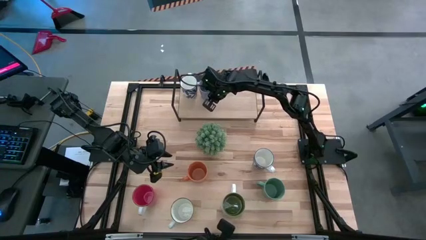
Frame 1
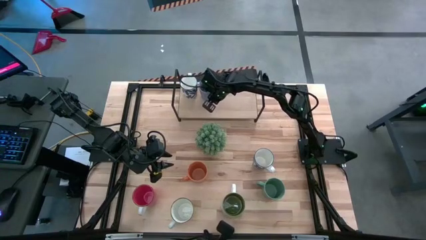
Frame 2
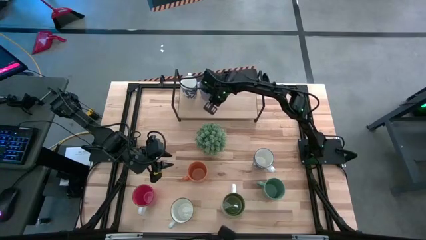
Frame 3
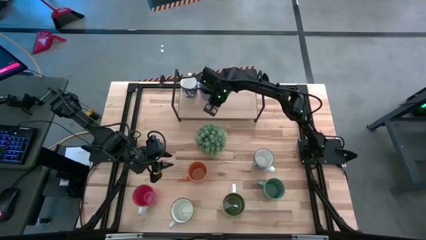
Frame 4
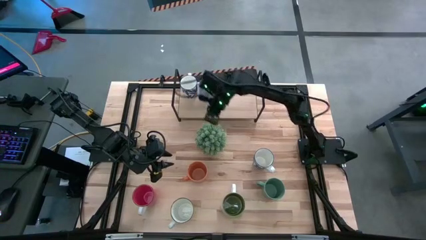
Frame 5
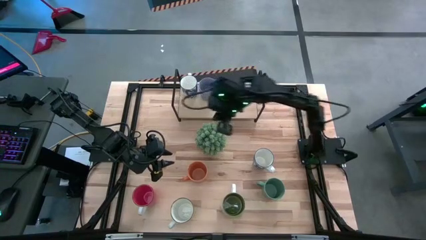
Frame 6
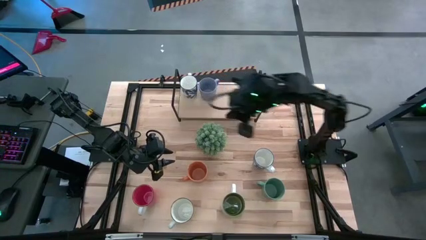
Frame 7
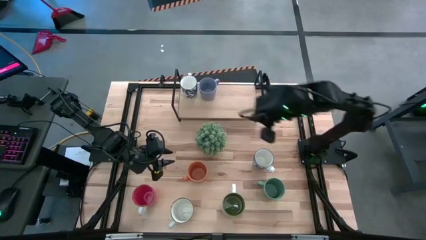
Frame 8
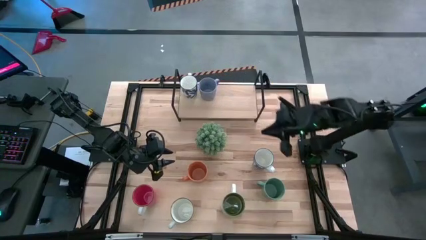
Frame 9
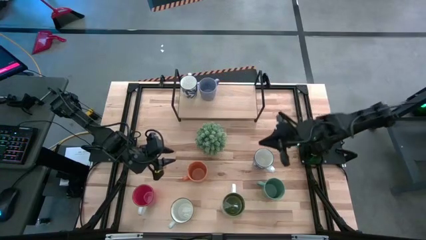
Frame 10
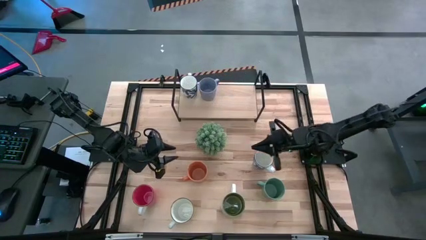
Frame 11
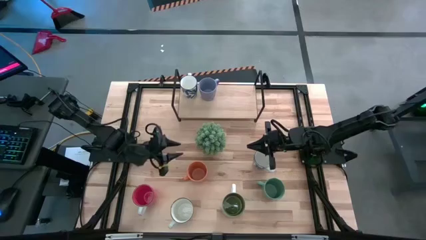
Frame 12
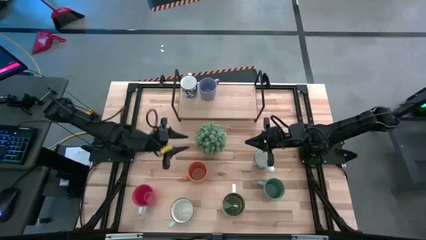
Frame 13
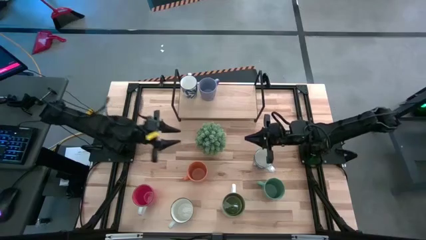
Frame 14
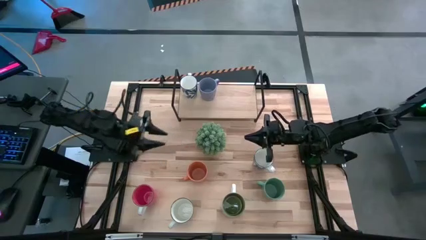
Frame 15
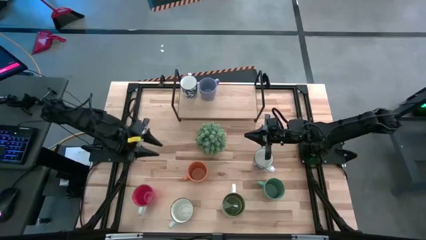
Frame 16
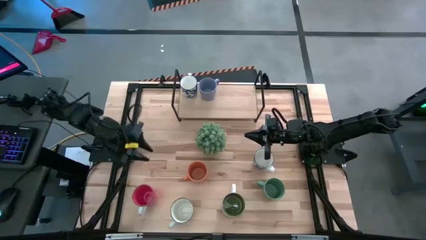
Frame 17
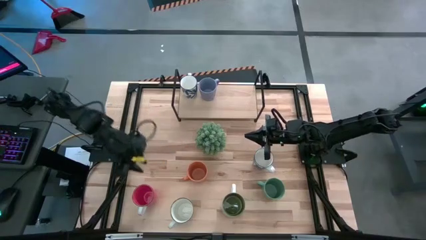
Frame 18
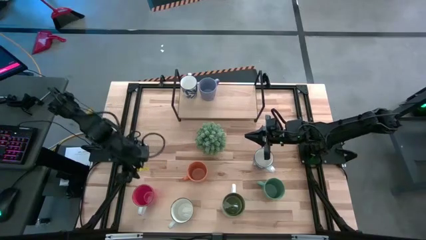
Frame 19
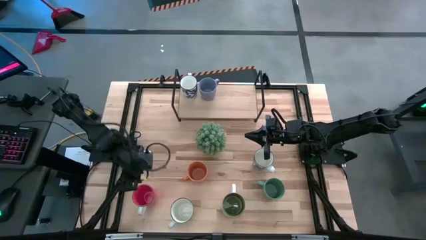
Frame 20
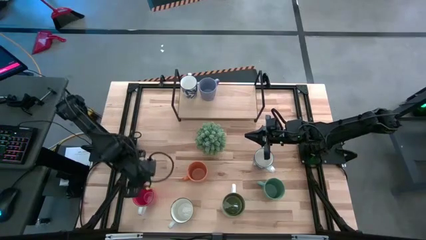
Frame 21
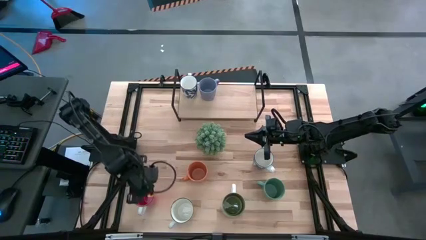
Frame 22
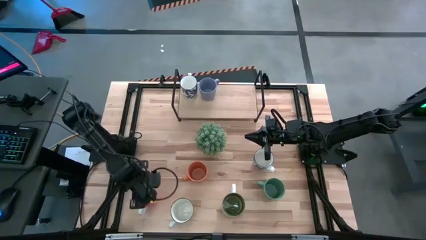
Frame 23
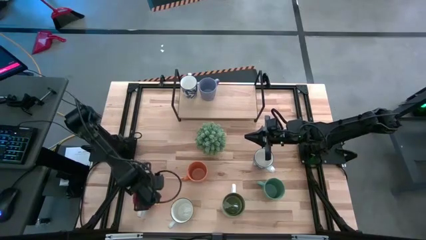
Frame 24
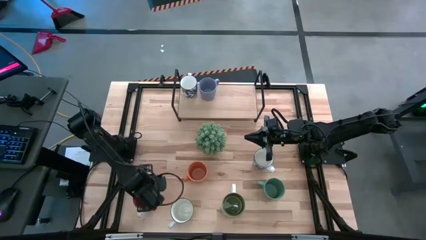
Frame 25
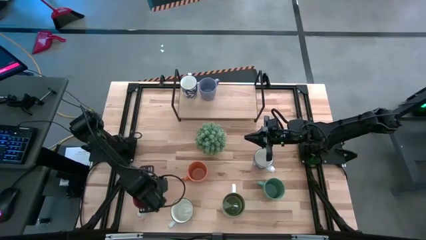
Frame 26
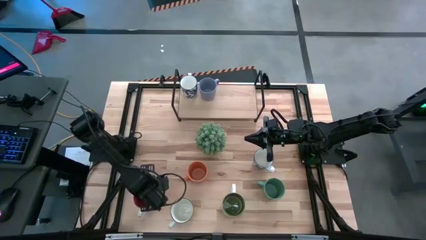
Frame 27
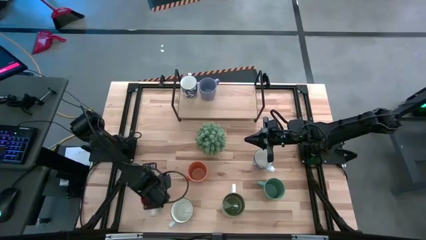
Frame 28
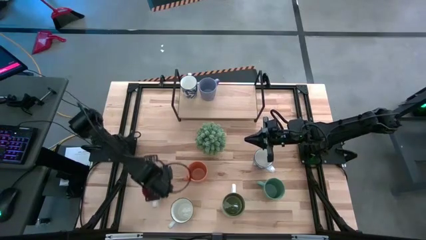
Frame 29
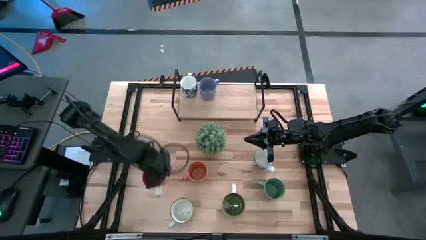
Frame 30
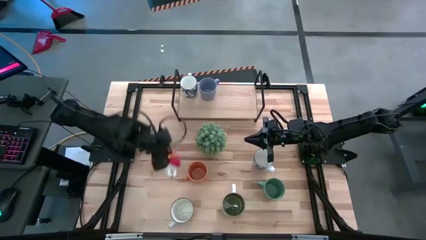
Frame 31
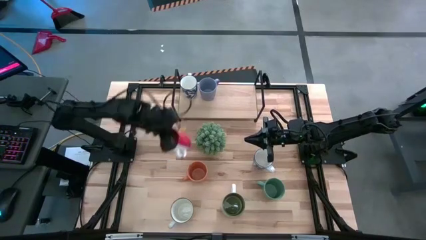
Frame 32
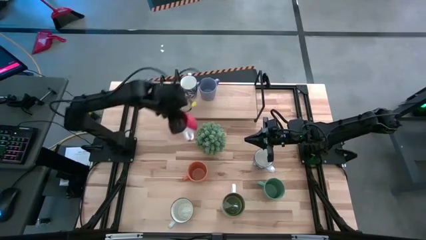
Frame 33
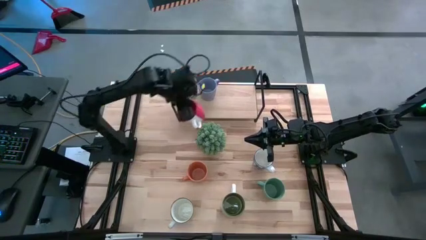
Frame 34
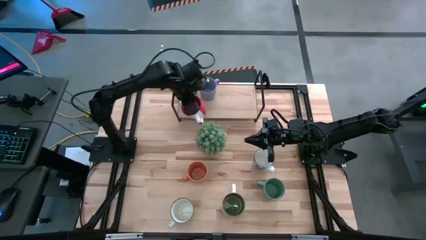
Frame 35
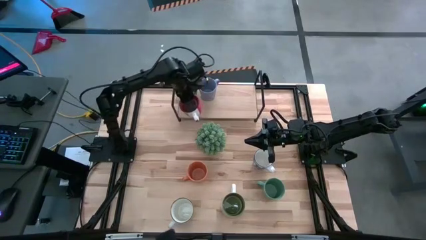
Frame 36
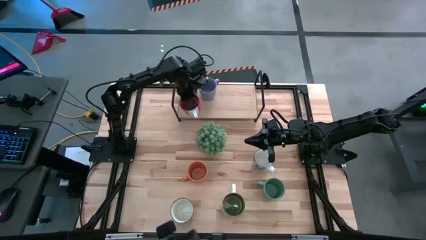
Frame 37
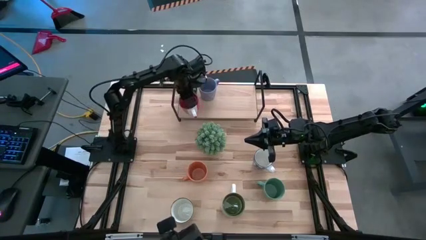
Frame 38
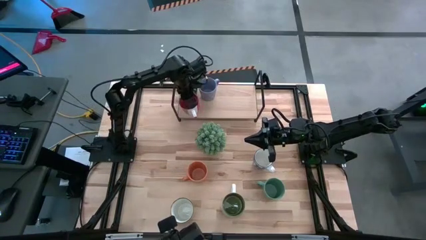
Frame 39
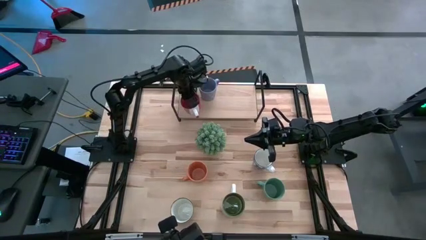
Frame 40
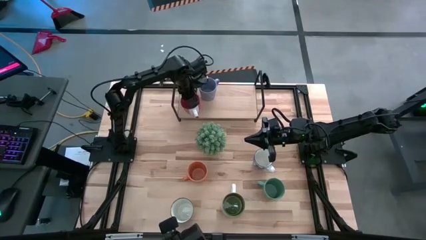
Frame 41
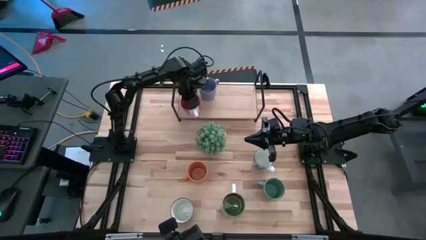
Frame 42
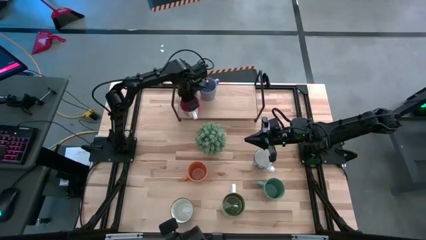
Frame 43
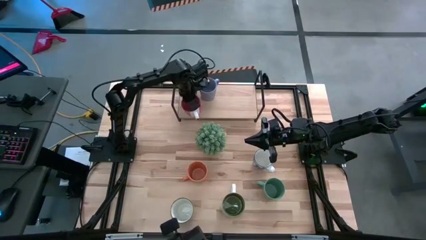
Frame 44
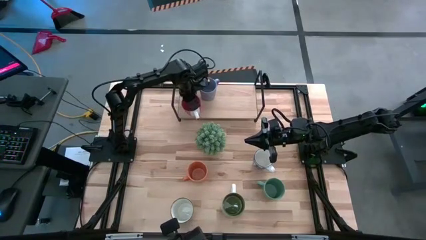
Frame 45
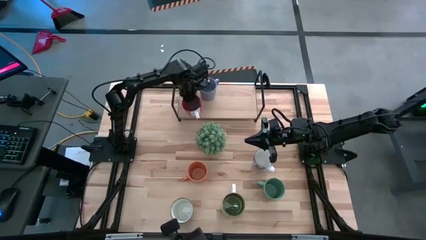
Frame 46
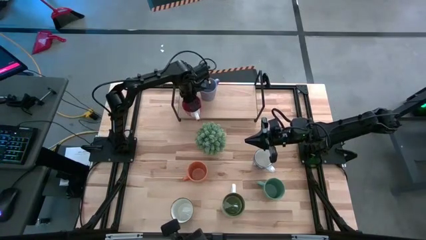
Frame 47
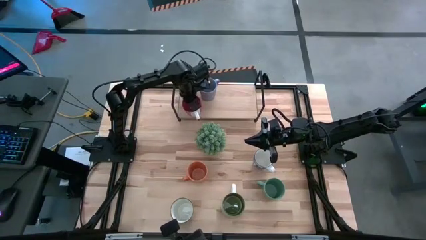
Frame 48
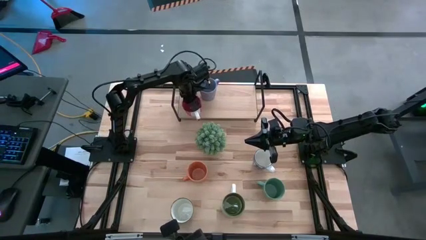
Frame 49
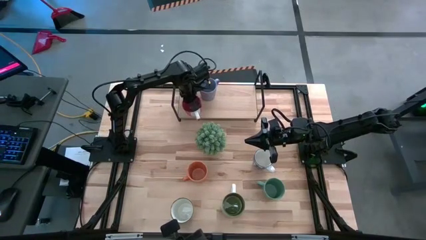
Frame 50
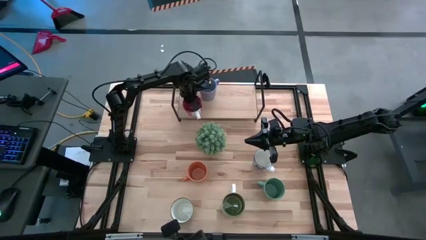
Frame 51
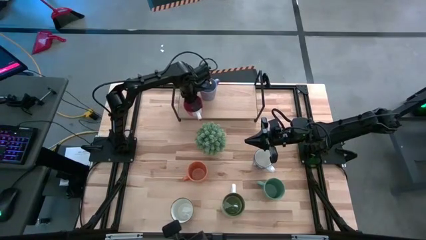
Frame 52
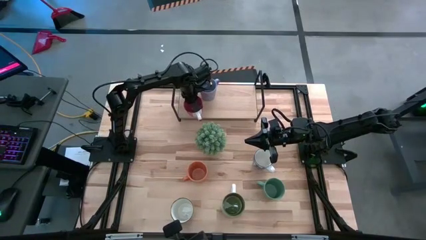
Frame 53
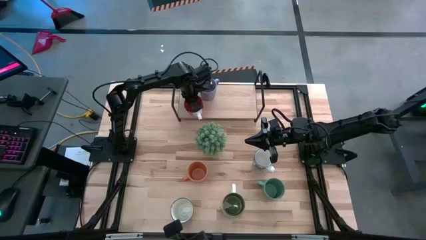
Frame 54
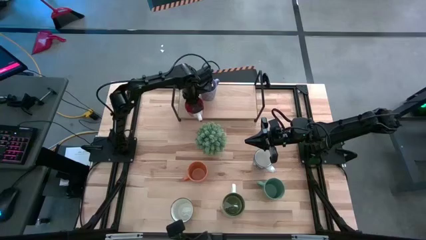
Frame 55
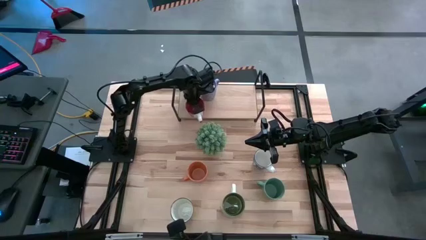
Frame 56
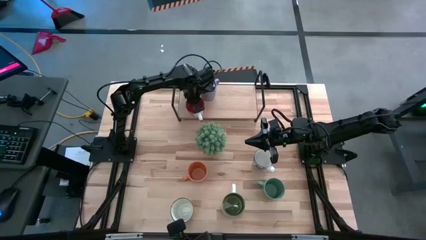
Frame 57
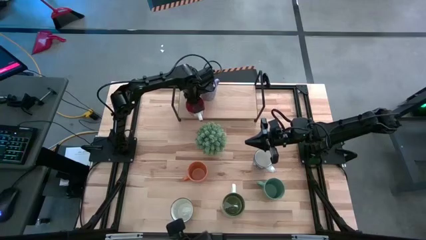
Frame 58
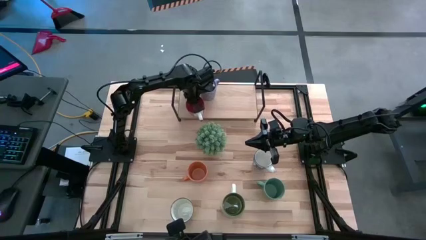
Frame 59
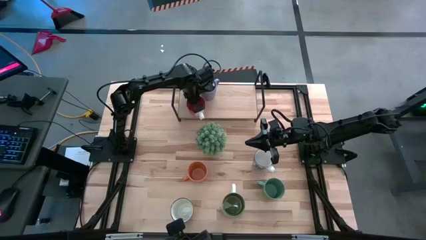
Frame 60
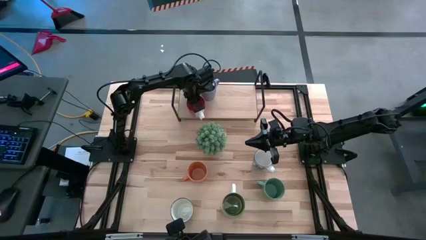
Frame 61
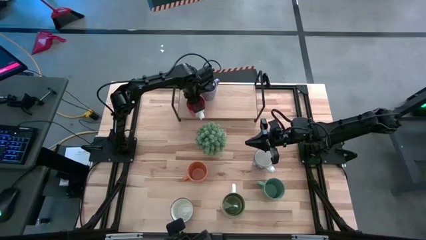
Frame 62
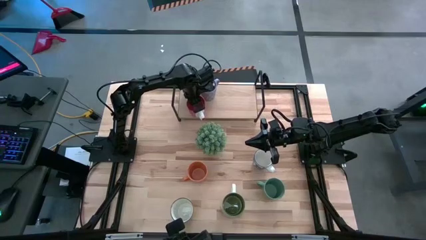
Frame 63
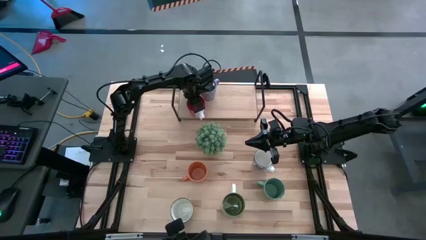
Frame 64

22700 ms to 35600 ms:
Task: Place coffee mugs
Put the red mug on the shelf
